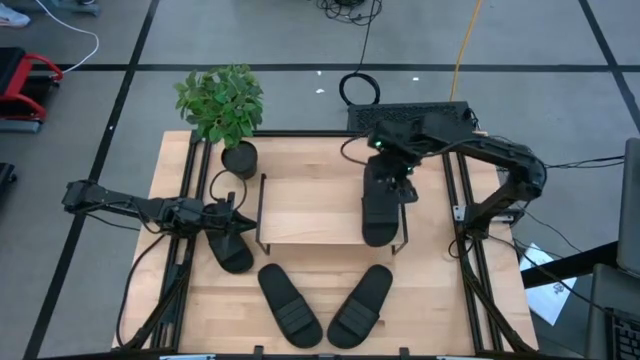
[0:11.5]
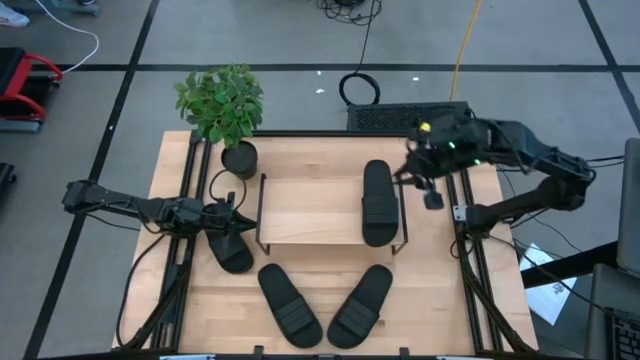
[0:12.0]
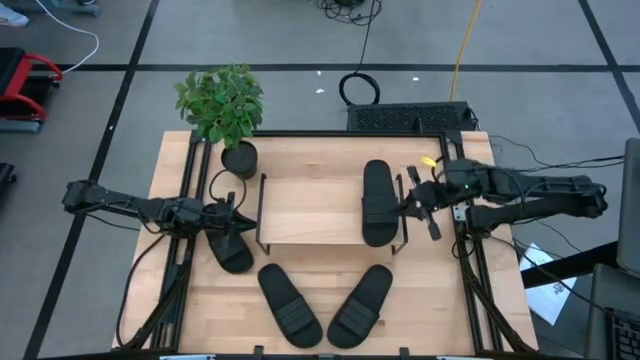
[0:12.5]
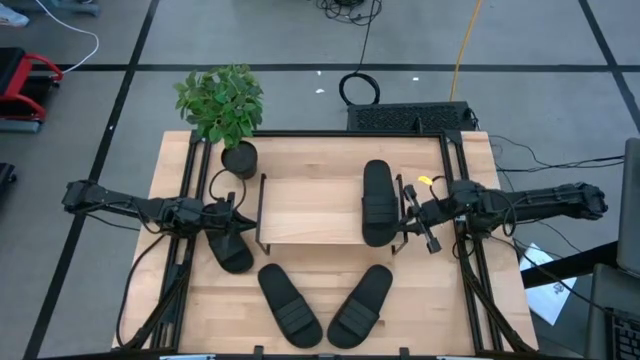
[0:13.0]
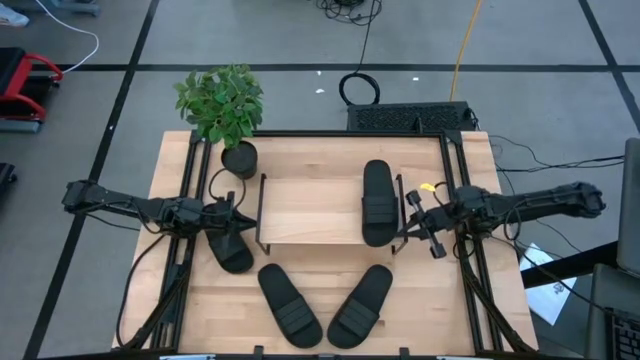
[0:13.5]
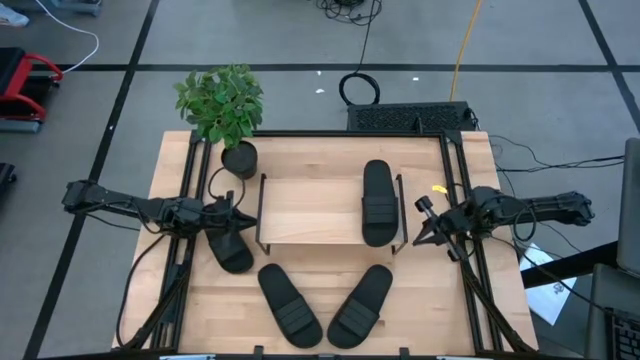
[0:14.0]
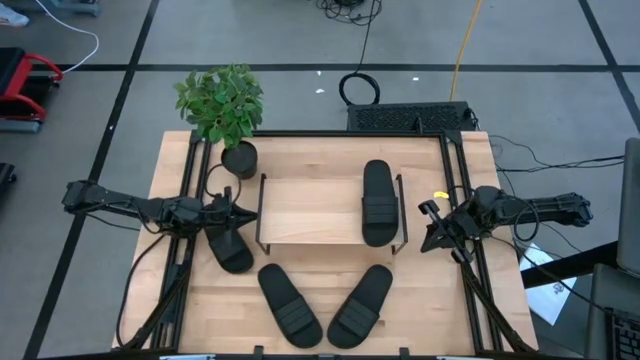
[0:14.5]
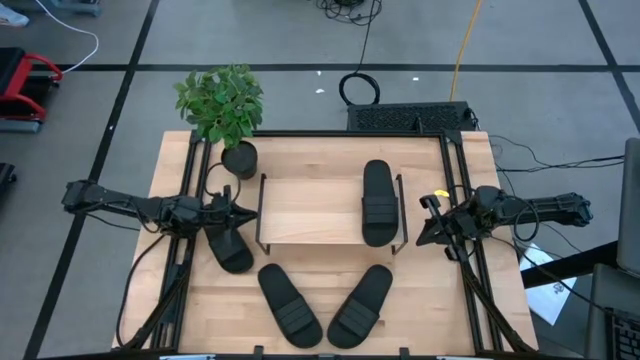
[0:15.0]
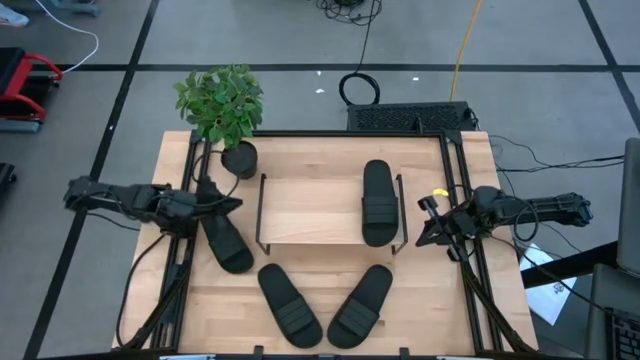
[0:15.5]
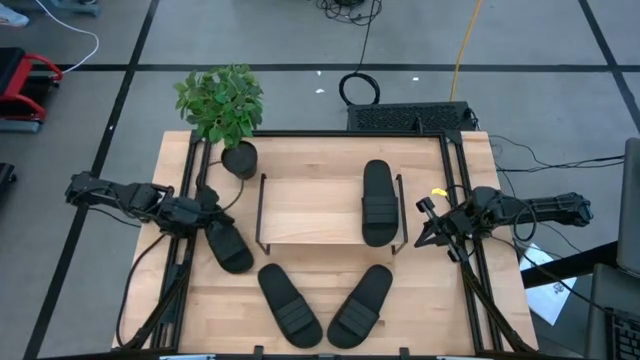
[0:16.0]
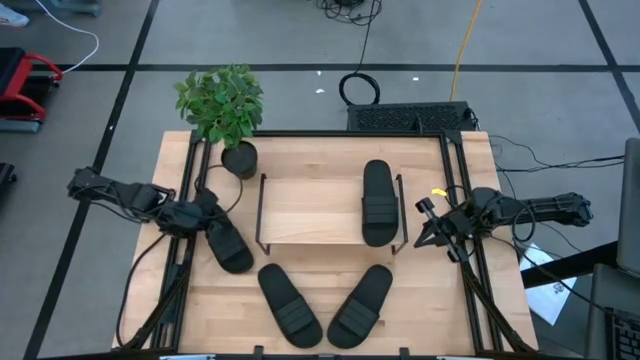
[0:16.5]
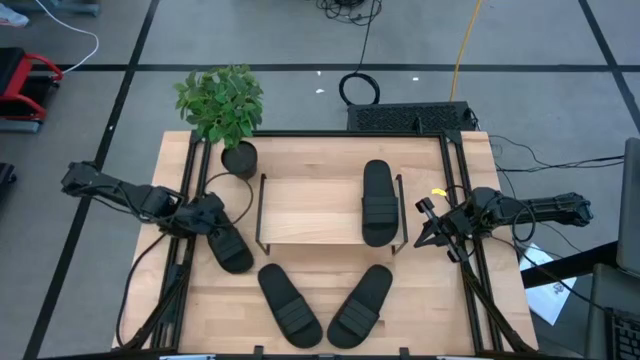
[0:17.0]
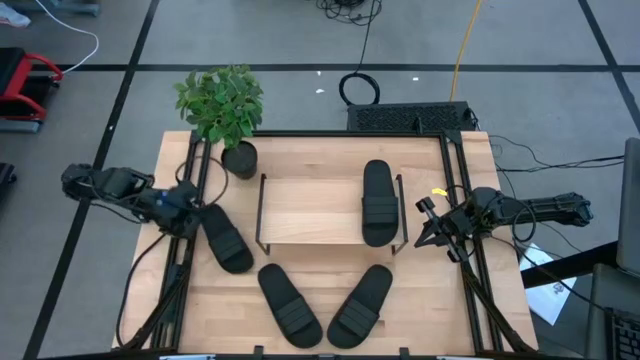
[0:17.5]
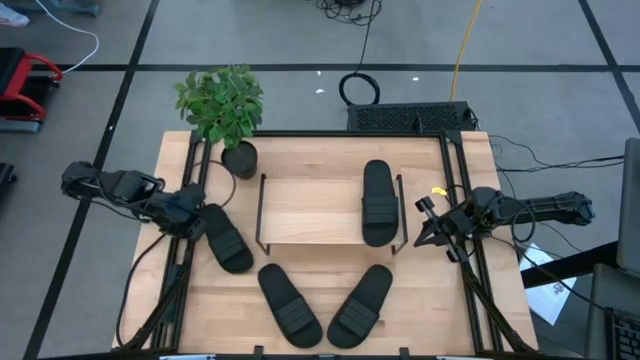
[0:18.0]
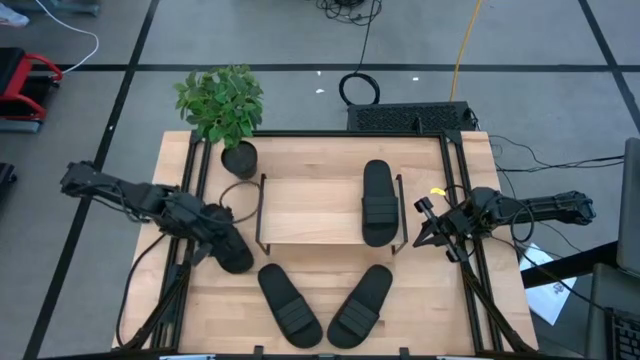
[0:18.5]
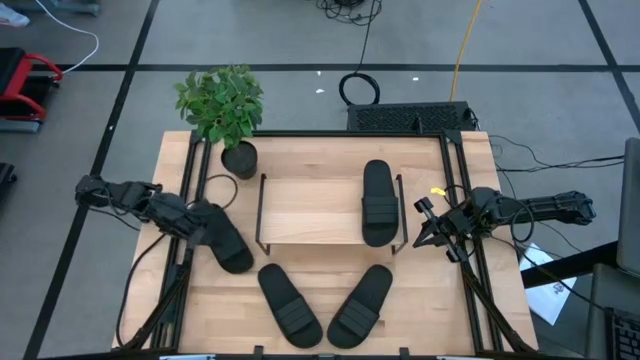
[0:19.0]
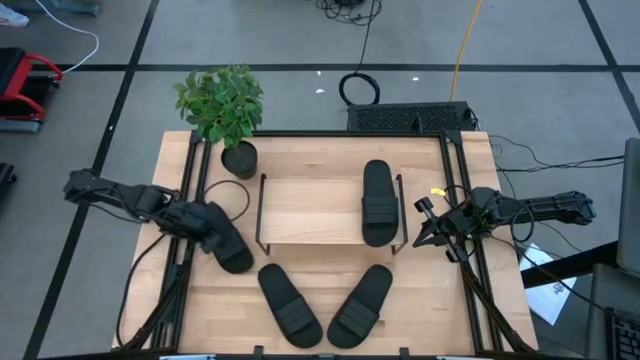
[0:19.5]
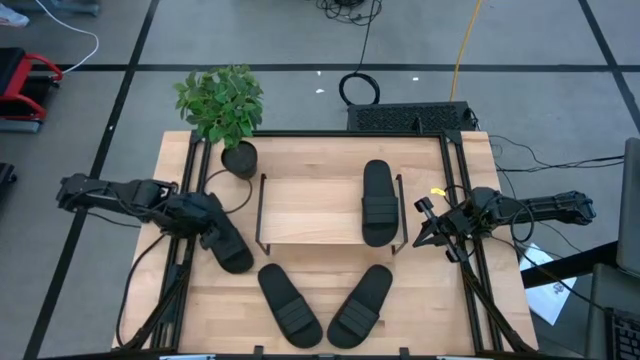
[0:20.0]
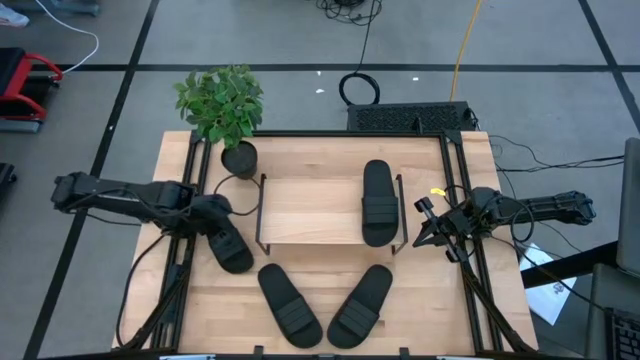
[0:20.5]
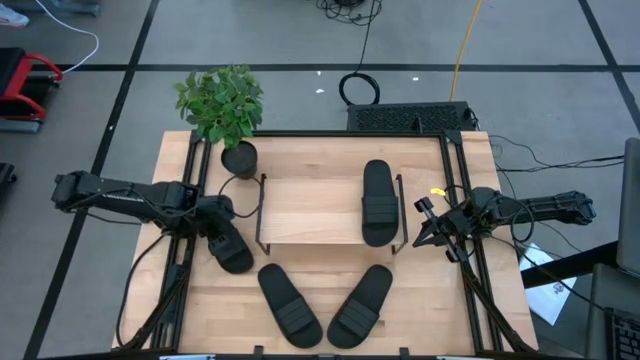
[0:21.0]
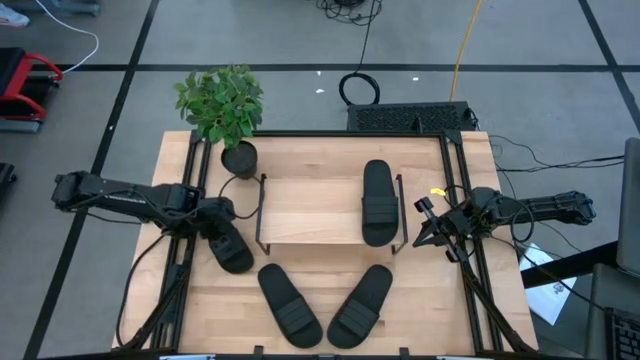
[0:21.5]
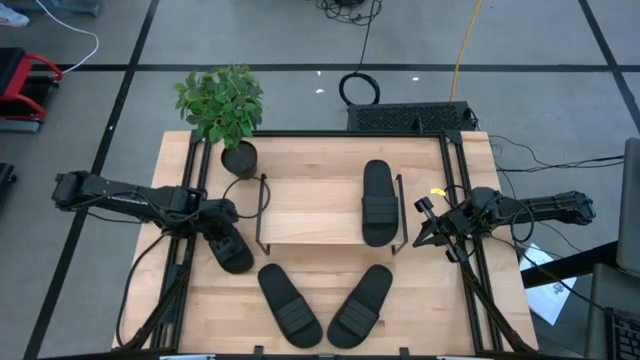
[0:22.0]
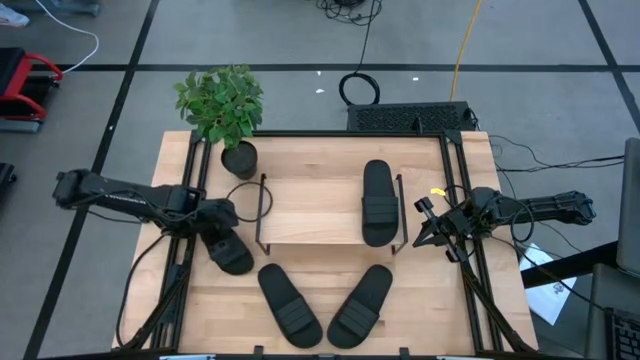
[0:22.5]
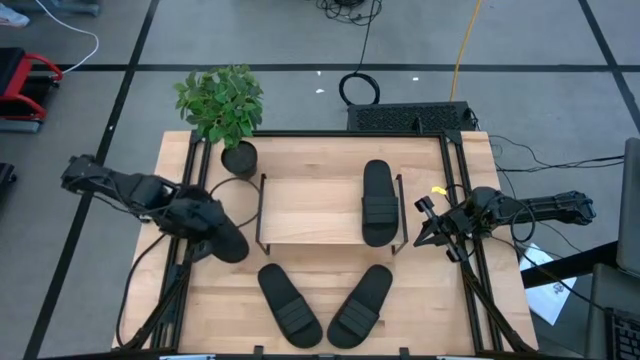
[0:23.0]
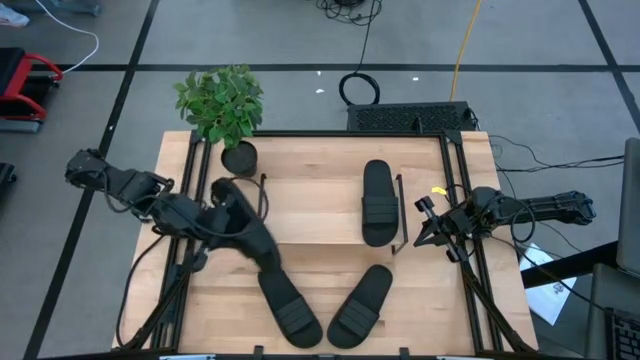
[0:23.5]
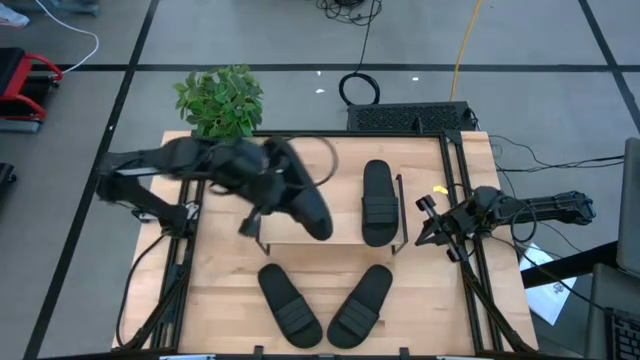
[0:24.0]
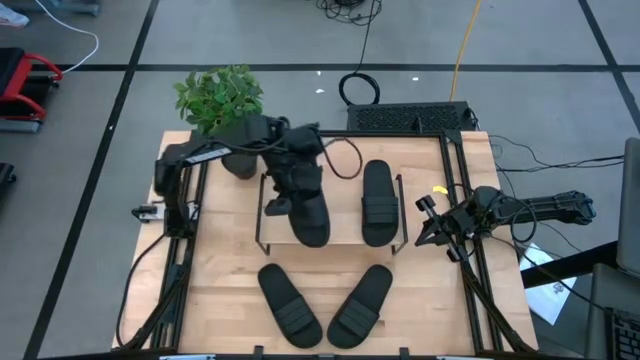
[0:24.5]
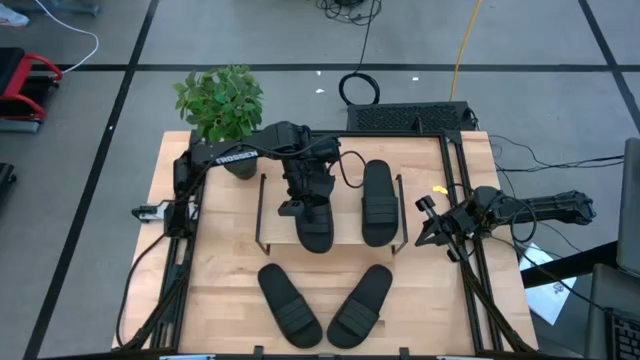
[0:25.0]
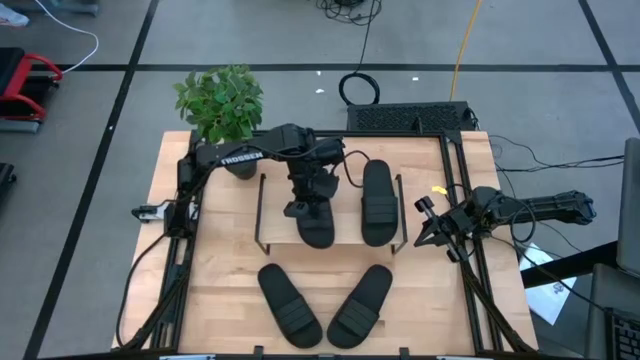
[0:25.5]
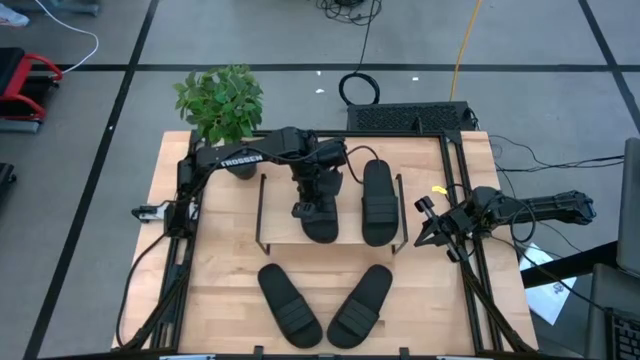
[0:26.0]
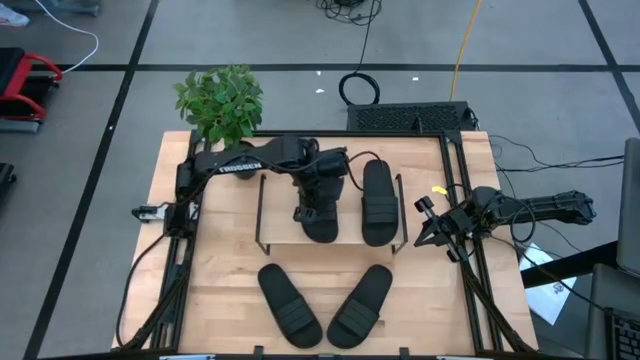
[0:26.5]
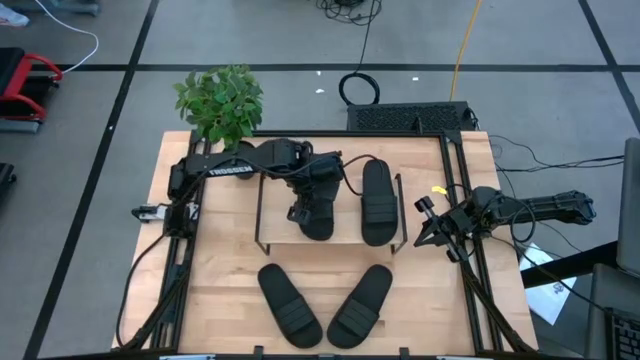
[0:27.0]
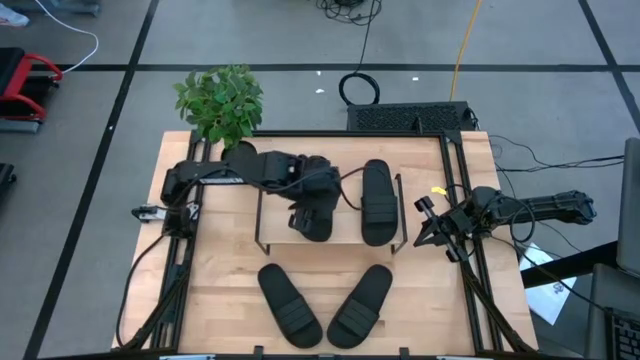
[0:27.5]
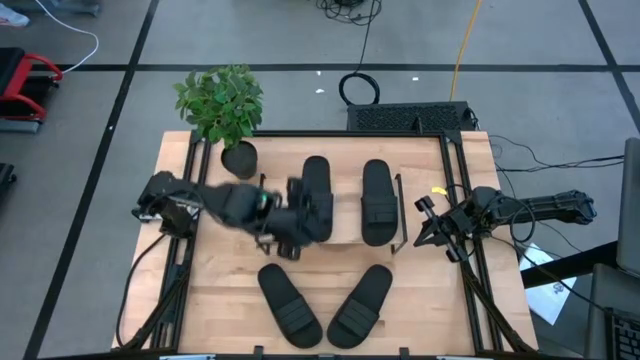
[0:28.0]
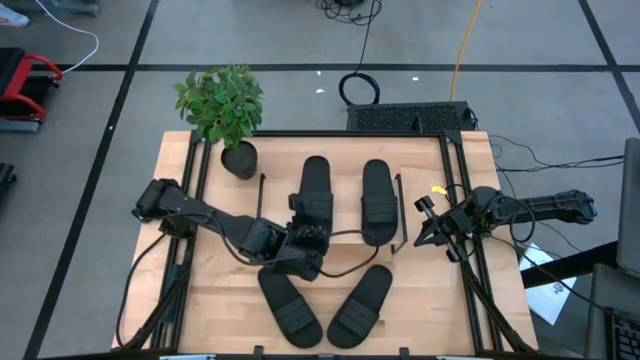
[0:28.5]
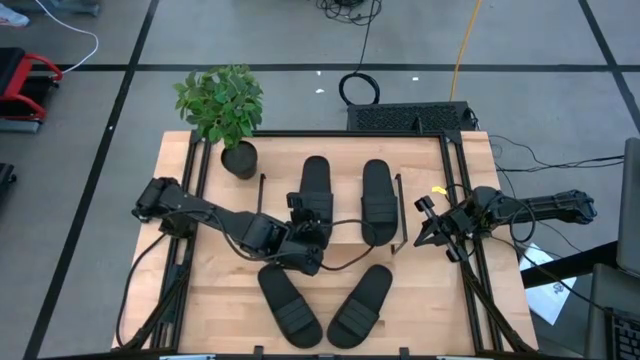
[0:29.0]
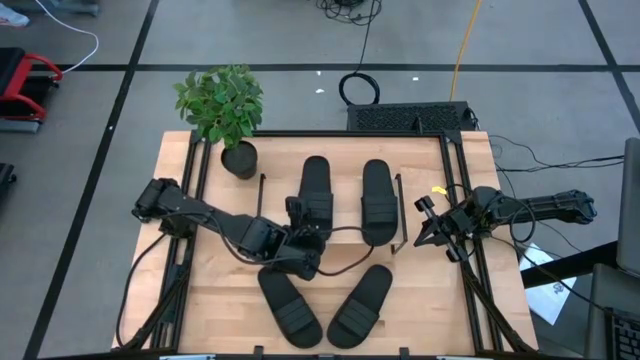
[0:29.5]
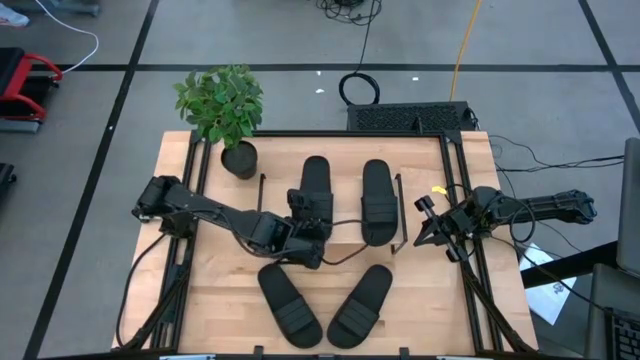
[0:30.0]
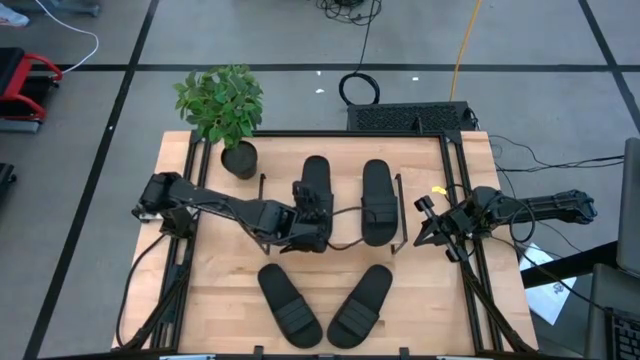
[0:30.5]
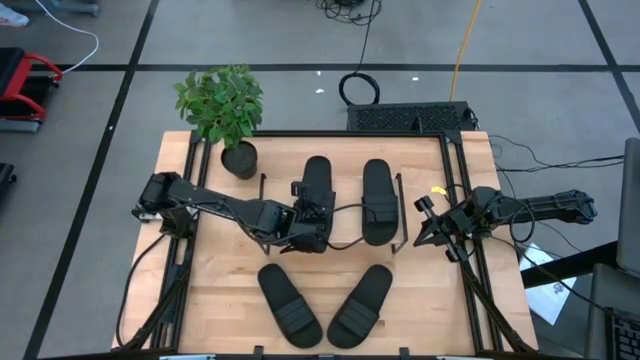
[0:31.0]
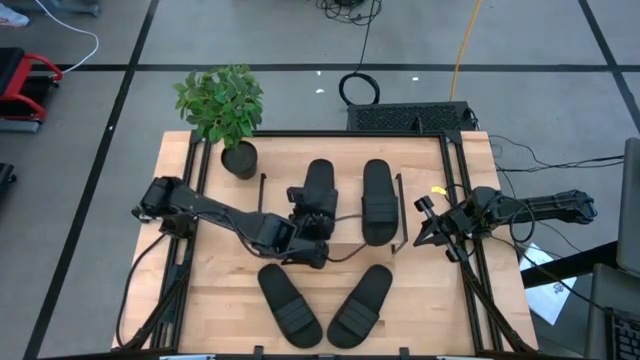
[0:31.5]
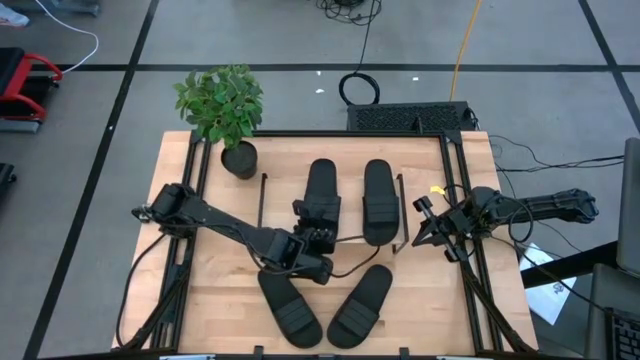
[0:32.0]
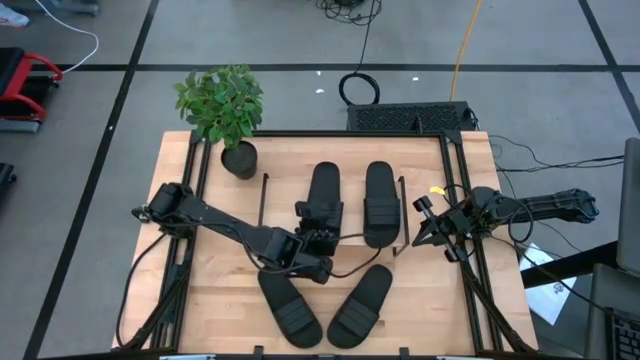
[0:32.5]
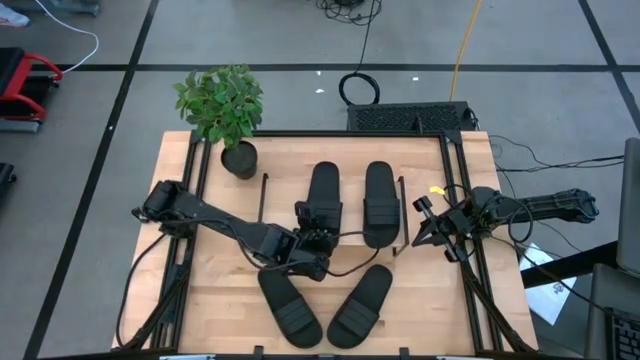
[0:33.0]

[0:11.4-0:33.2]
Task: Pick and place slides into the shelf
Put the top left black slide on the shelf
